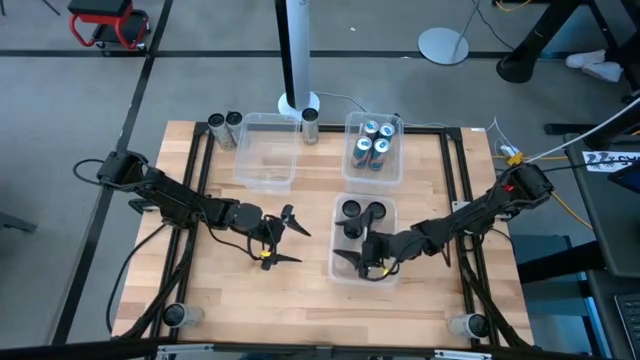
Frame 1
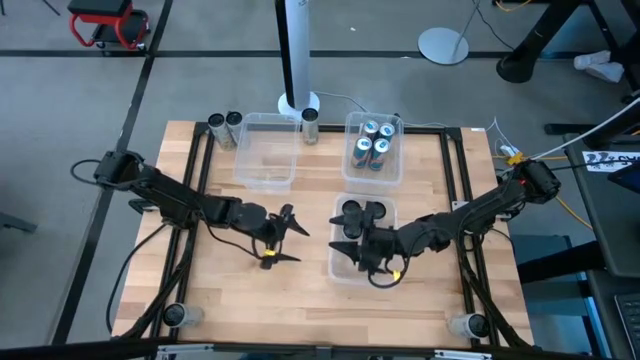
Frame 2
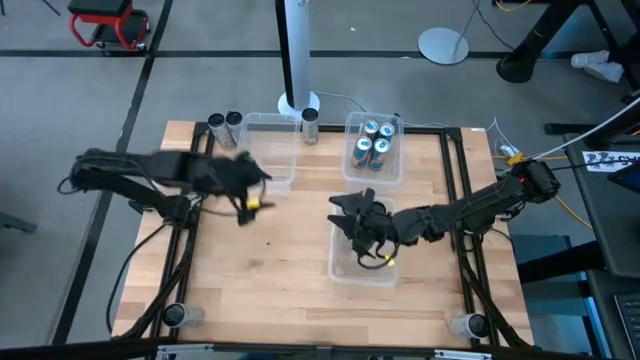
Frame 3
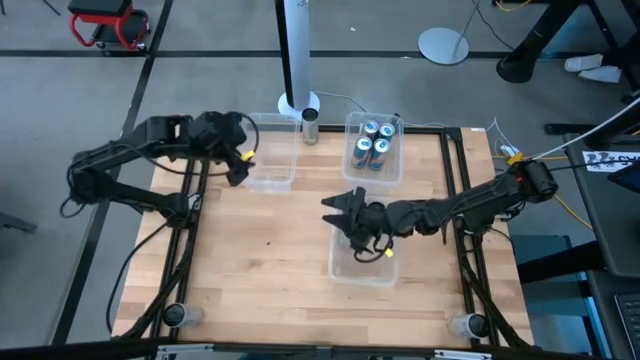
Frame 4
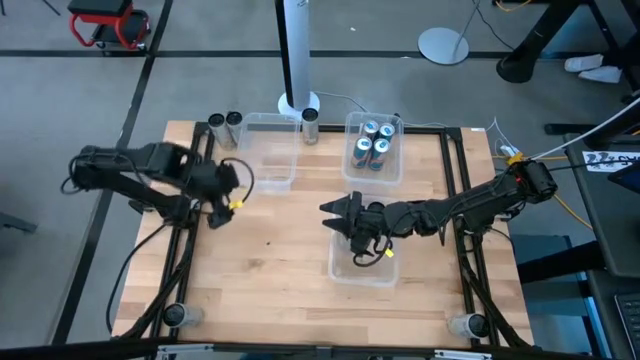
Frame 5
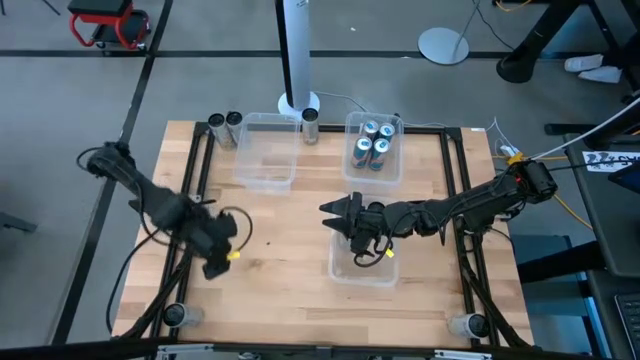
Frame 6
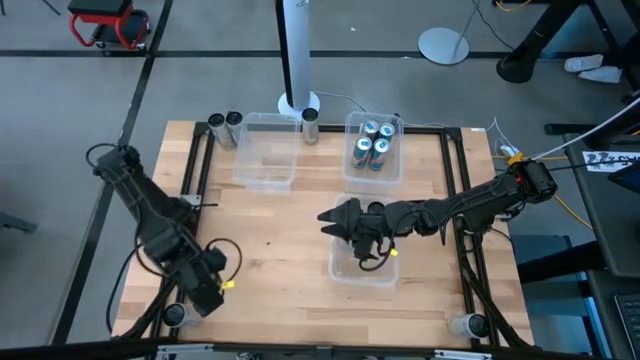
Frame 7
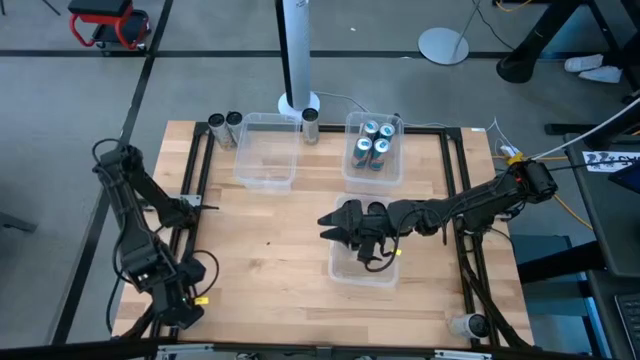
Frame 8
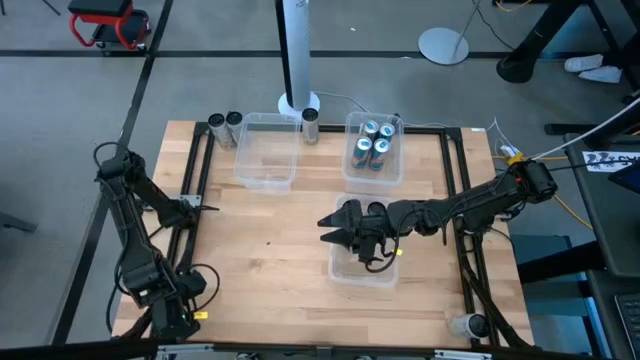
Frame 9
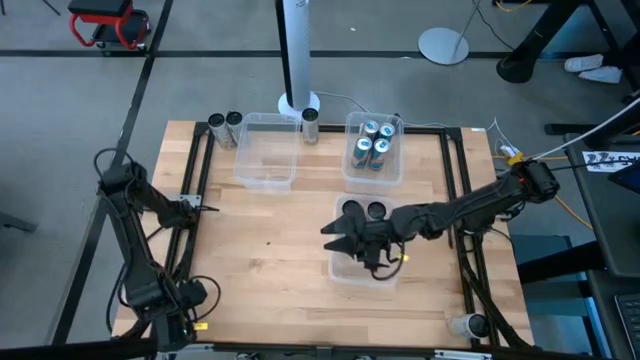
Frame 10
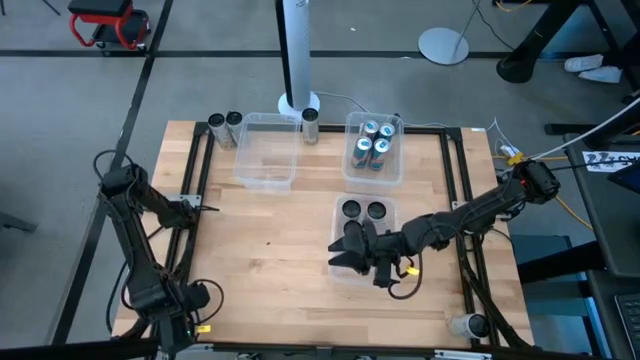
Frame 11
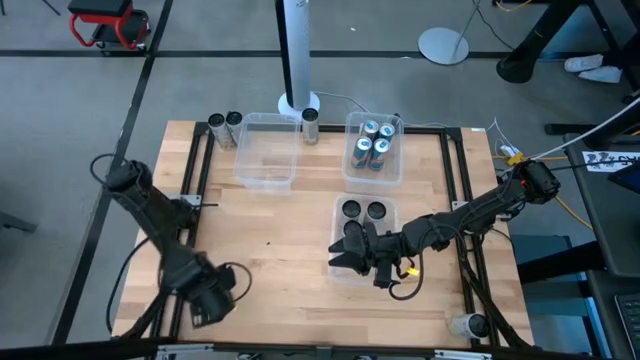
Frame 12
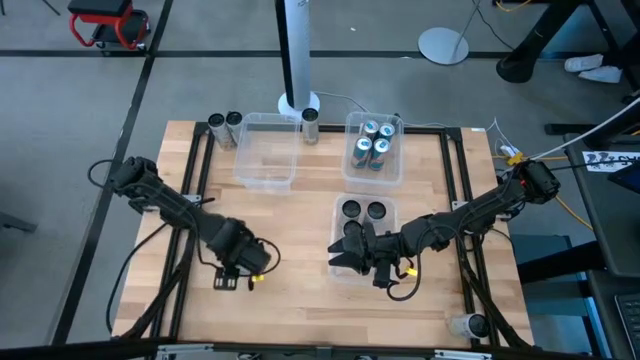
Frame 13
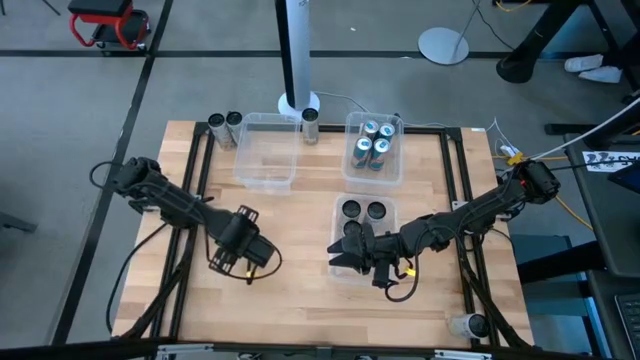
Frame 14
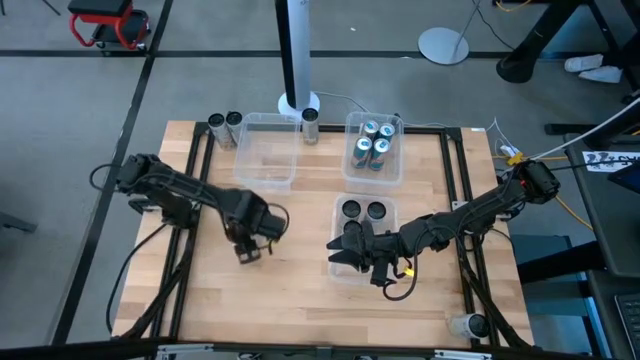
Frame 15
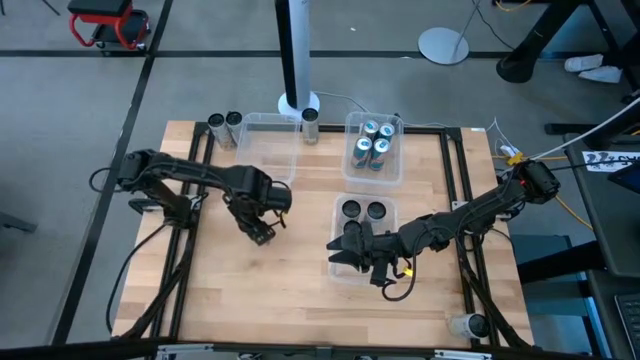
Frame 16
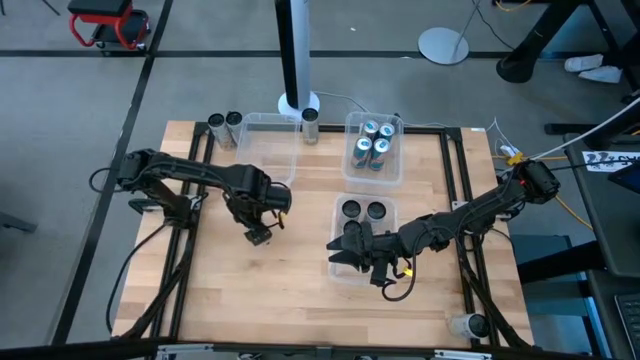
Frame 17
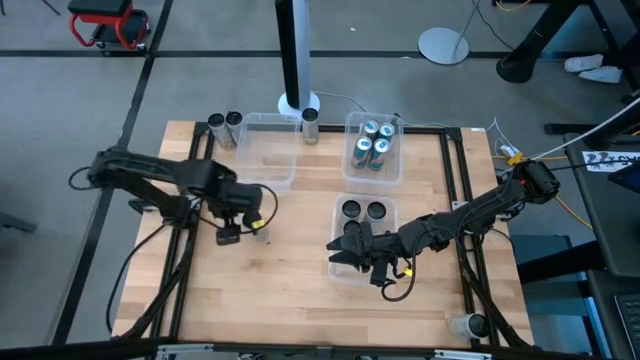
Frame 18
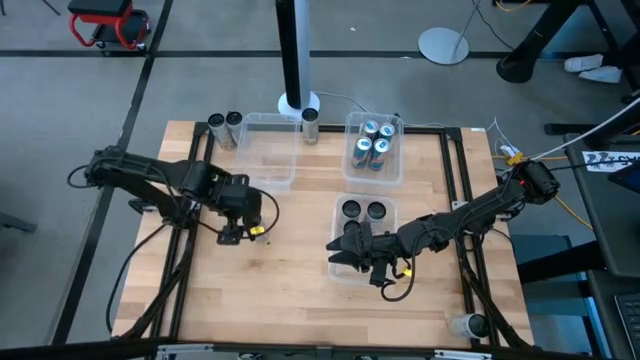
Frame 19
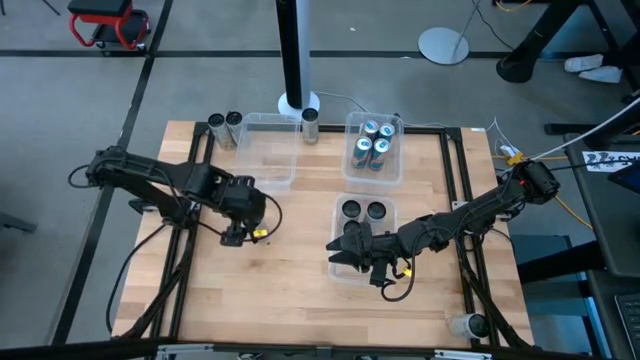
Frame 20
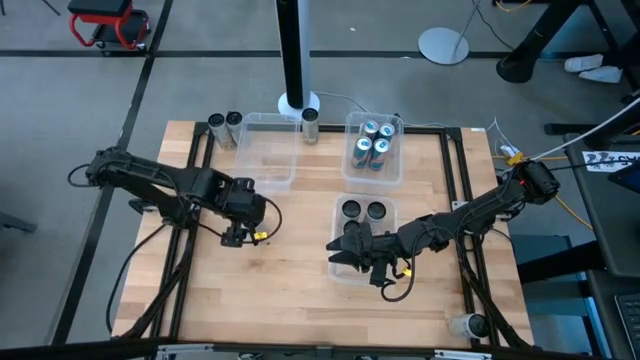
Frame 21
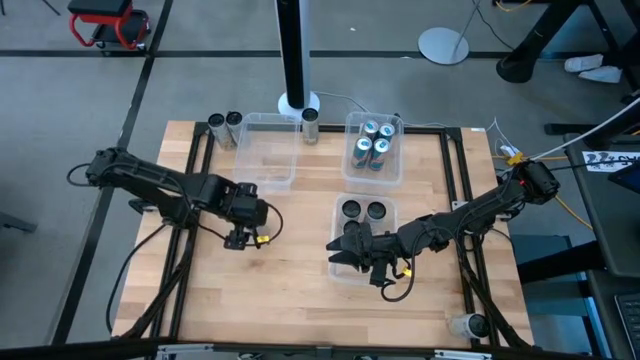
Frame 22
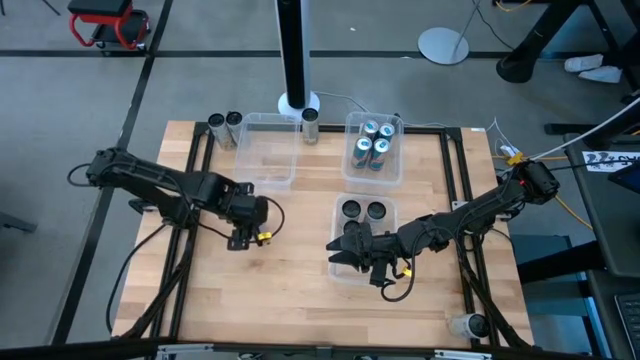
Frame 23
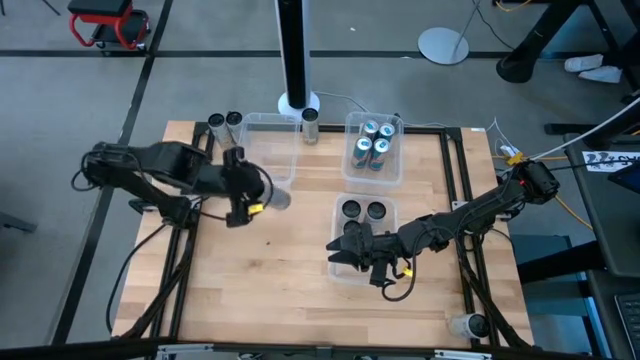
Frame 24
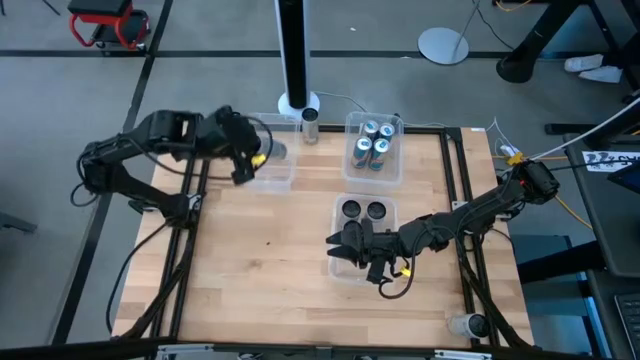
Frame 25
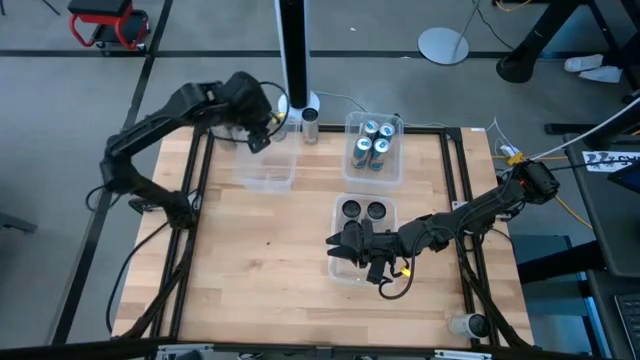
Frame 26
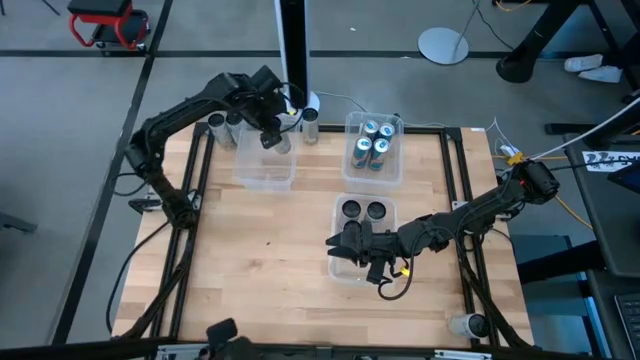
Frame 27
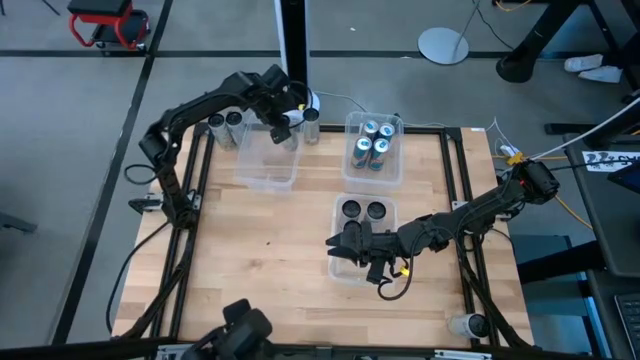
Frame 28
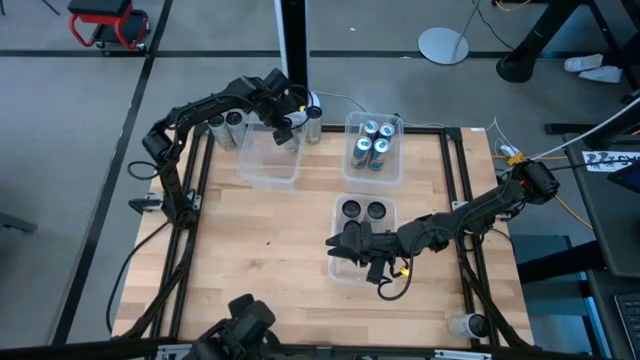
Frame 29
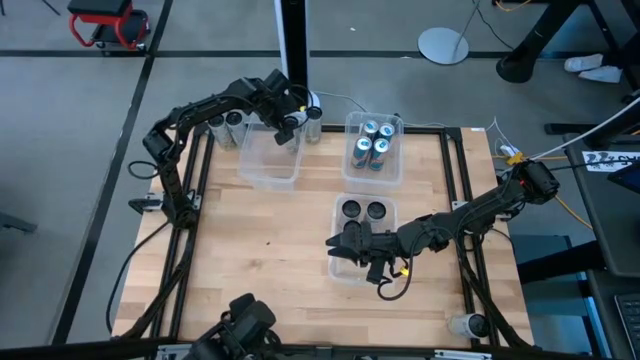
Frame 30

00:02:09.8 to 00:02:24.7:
Task: Sort soda cans
Put the white yellow soda can into the top left transparent bin

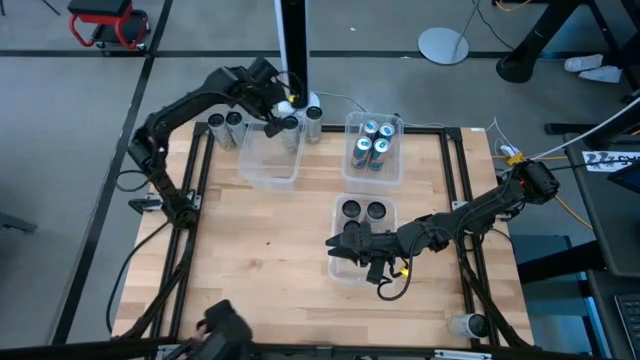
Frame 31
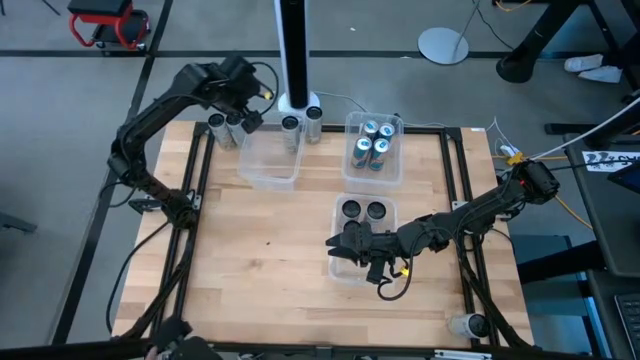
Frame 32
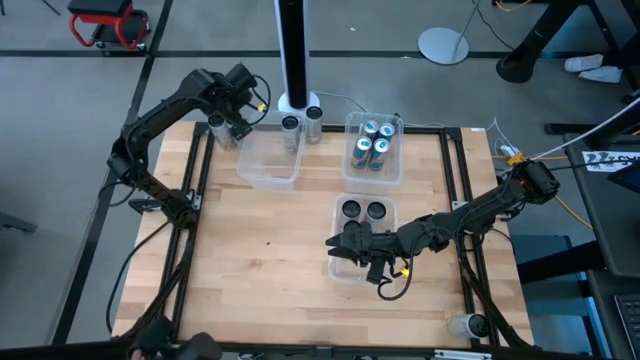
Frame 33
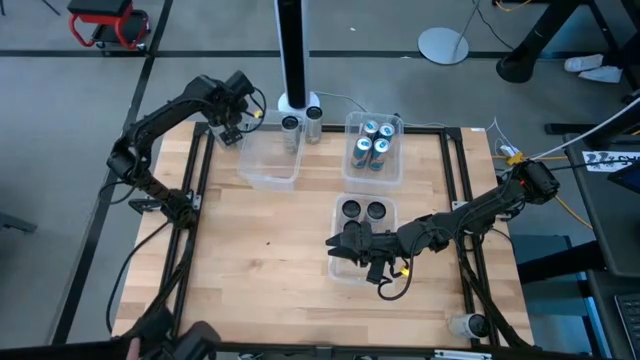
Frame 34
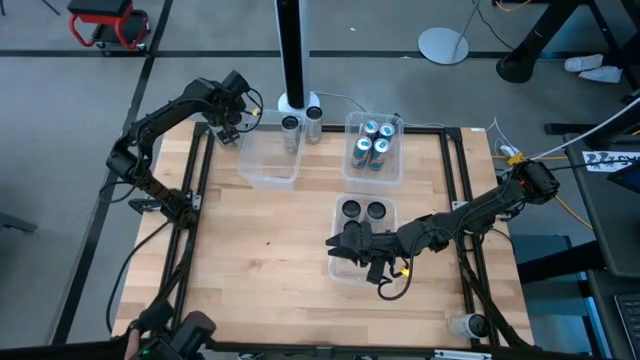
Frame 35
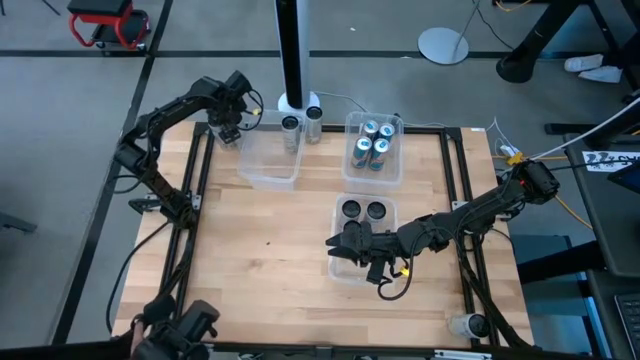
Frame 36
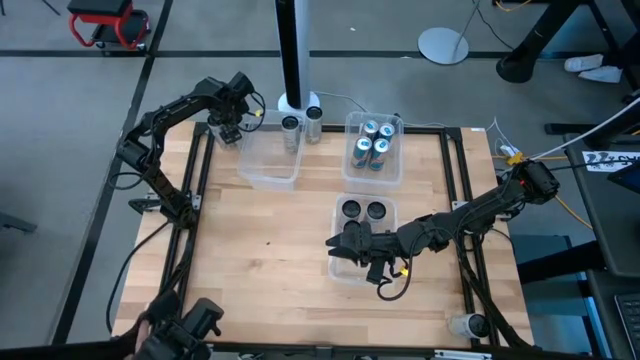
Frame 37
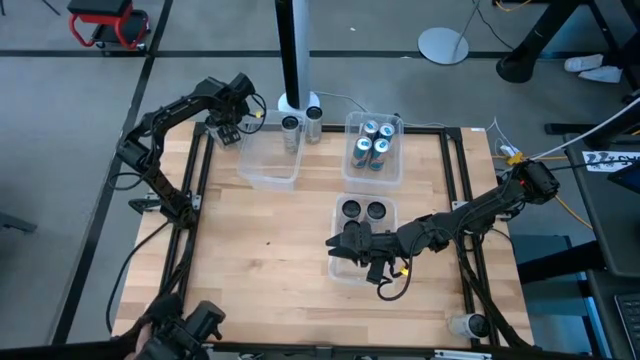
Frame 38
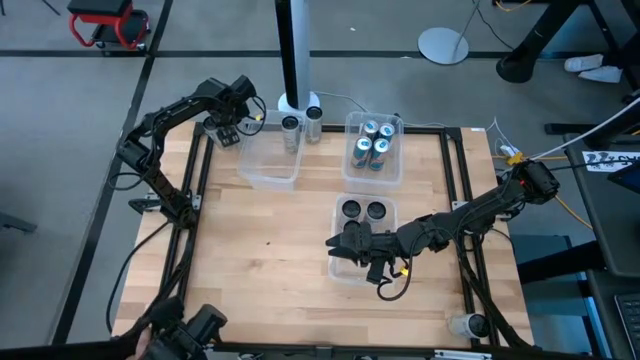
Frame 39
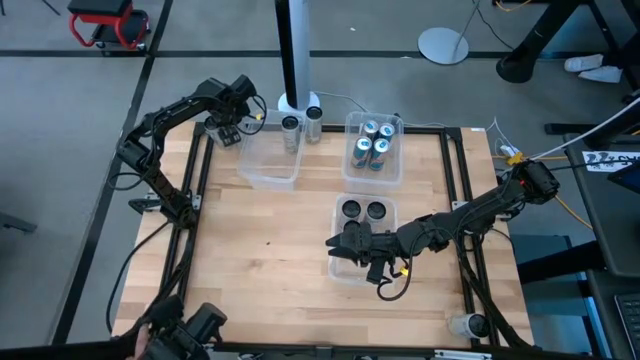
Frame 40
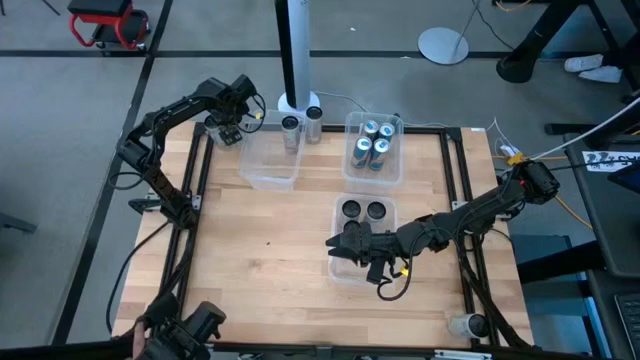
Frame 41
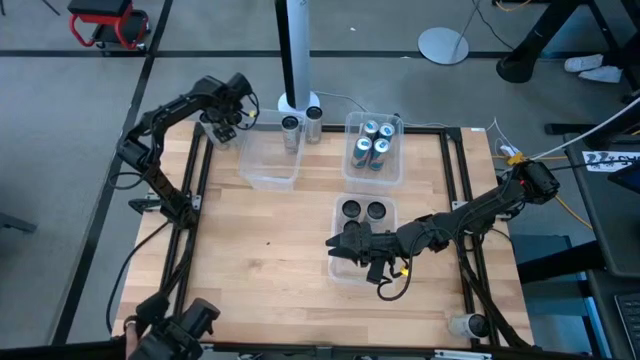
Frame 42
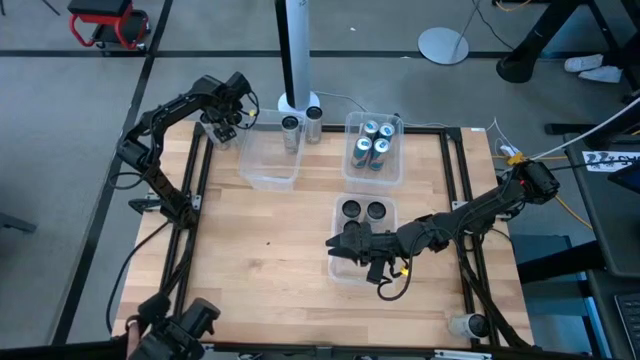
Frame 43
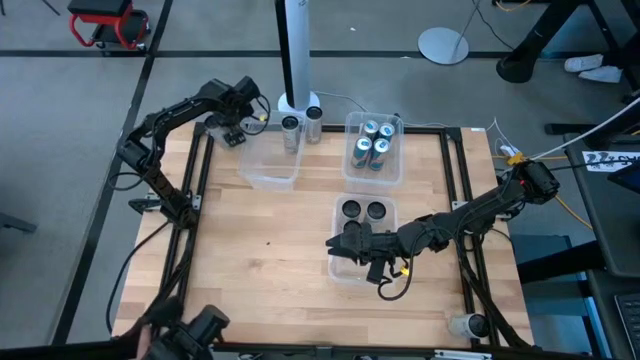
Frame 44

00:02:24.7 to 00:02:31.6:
Put the white yellow soda can into the top left transparent bin
